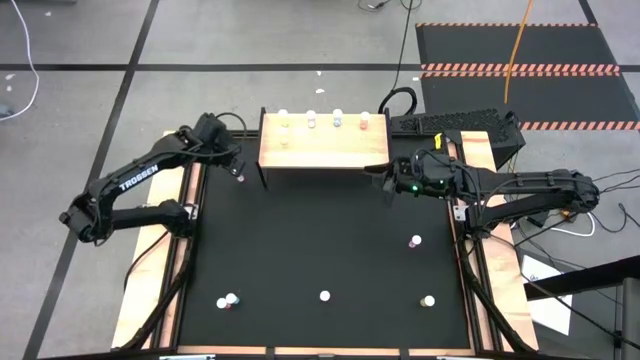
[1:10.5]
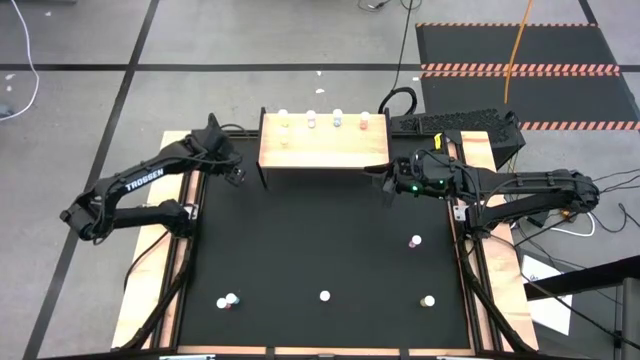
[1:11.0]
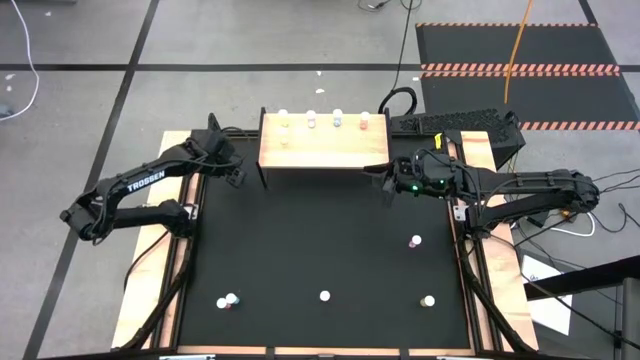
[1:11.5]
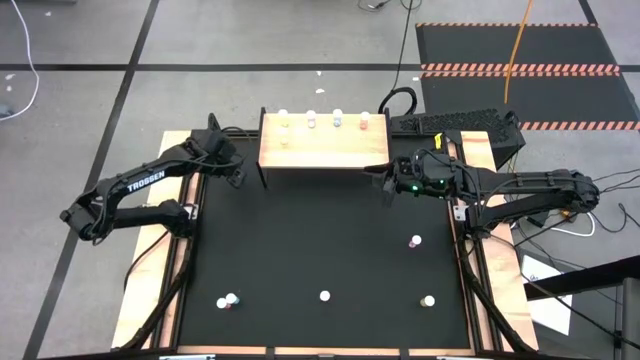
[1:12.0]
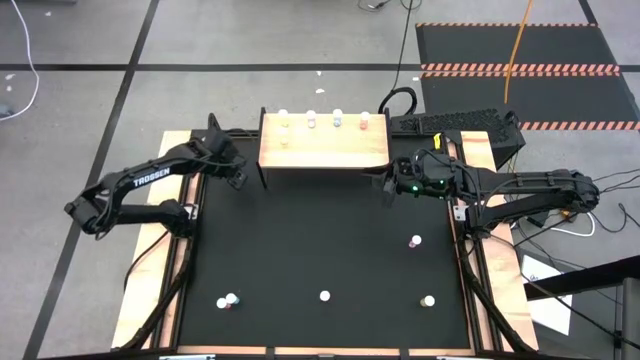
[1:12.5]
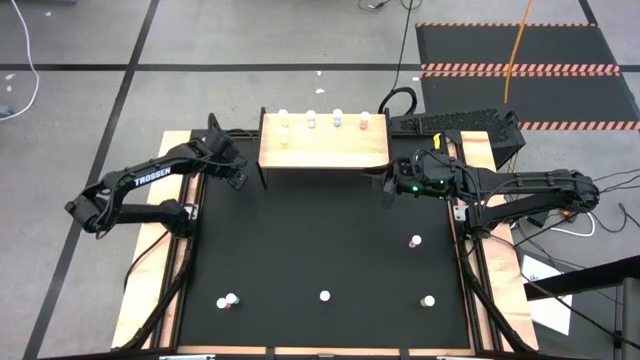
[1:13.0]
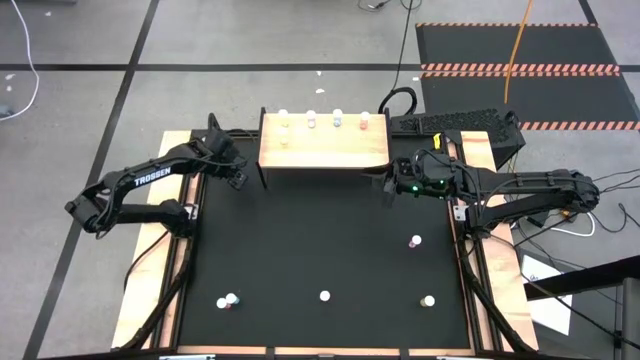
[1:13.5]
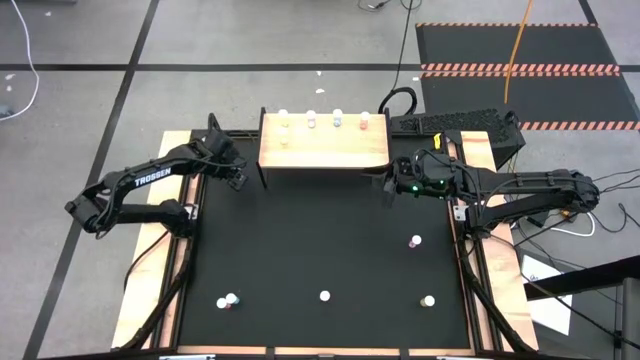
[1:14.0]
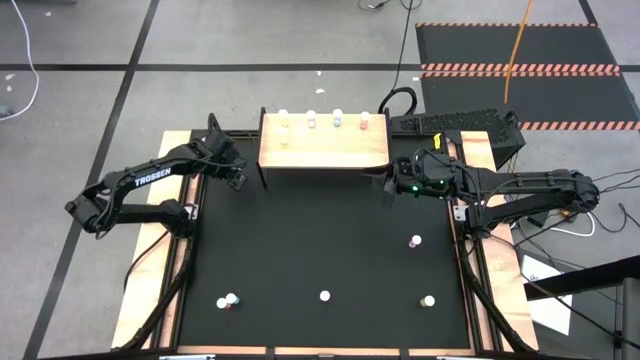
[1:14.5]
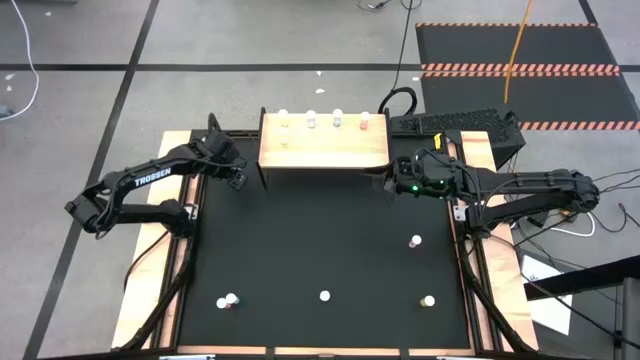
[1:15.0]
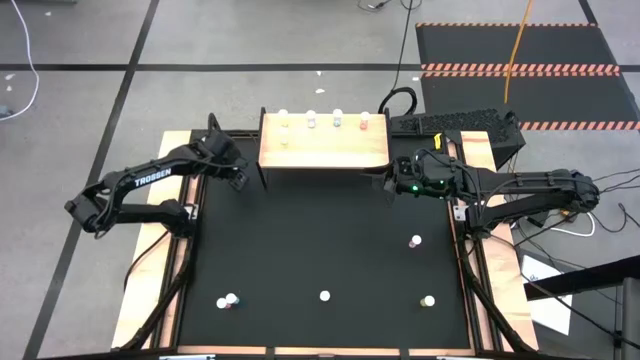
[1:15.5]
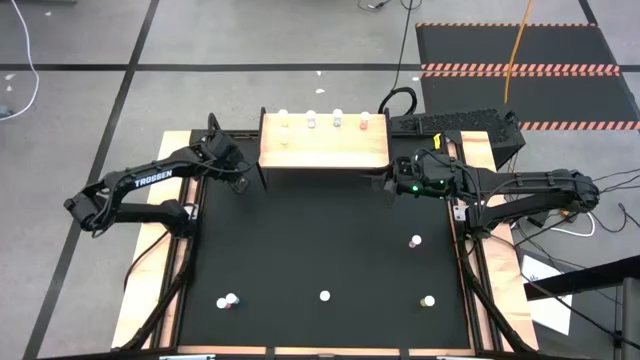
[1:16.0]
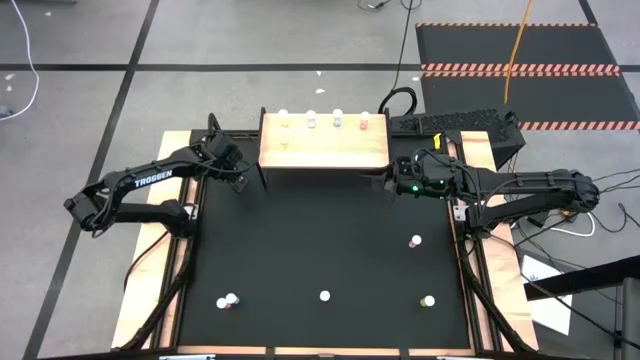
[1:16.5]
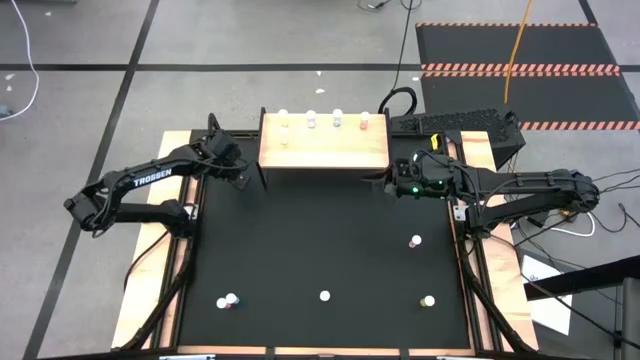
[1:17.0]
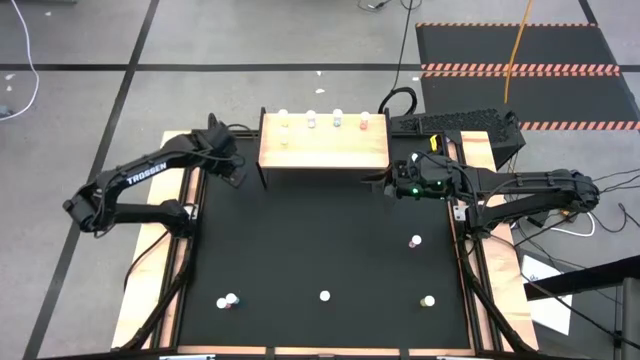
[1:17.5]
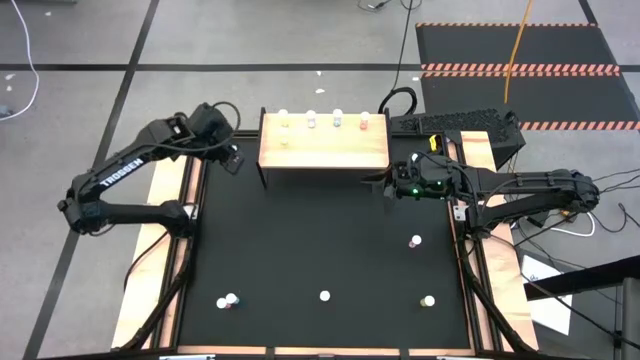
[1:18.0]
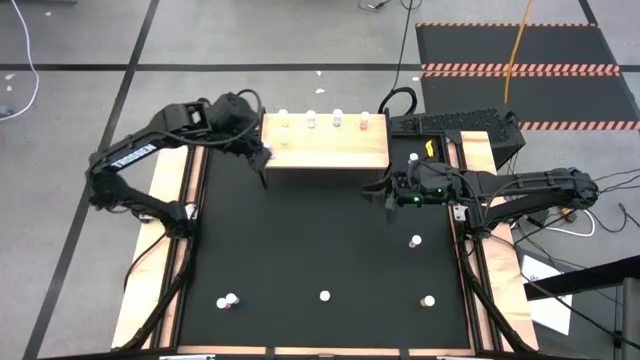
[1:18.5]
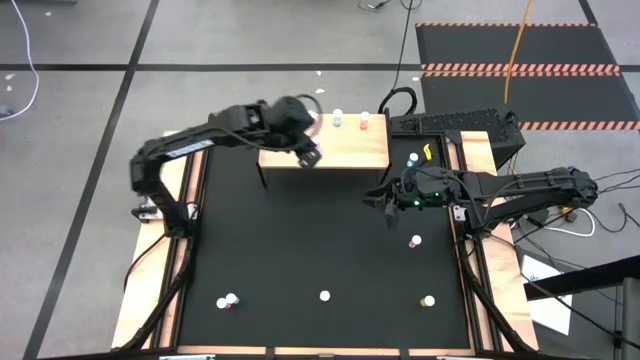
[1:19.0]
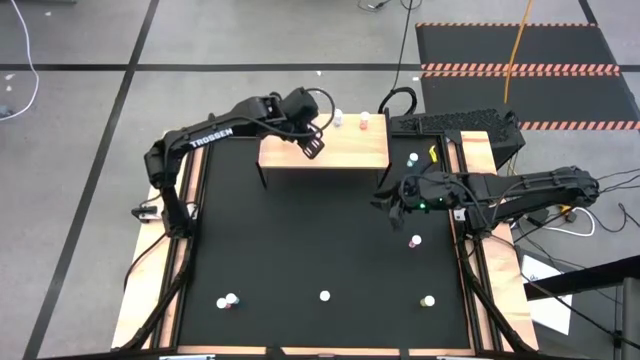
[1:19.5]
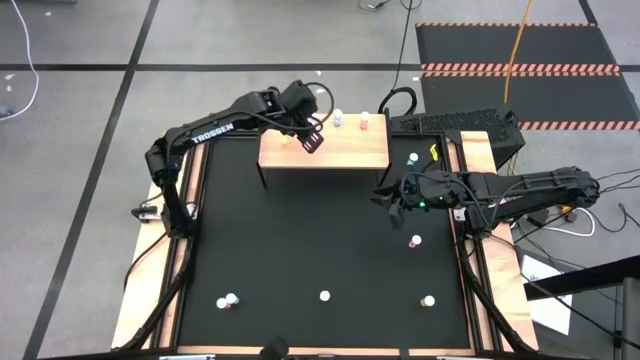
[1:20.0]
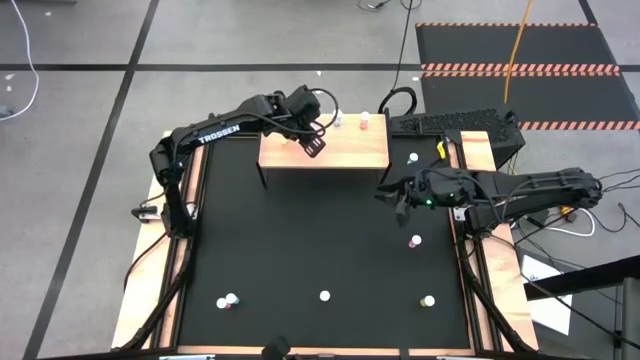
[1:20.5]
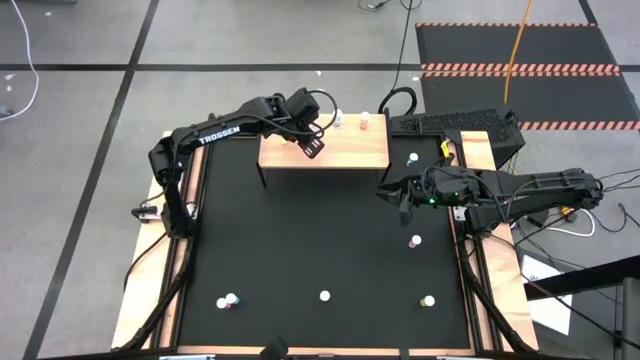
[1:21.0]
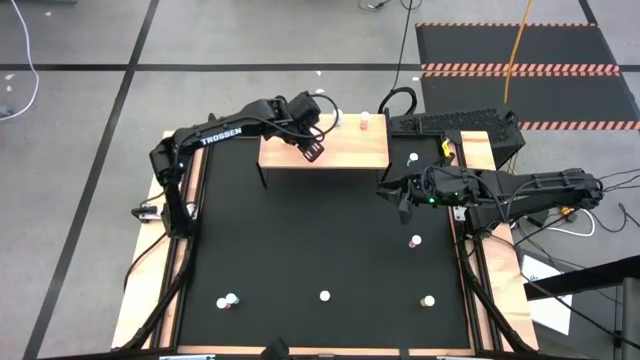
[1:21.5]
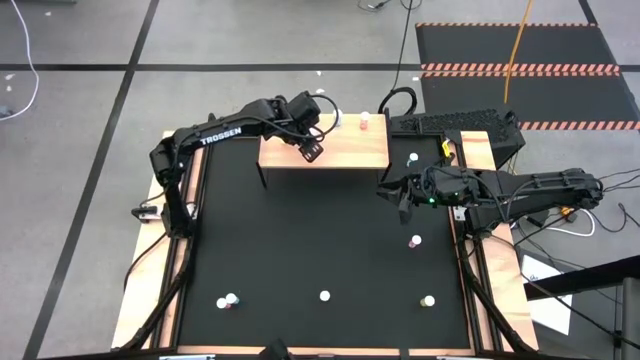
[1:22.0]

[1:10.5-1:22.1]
Task: Pick and place medicine bottles onto shelf by color
Put the top pink pill bottle on the shelf aligned with the other pink bottle

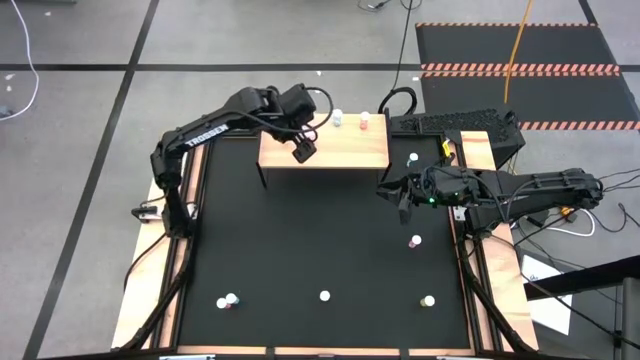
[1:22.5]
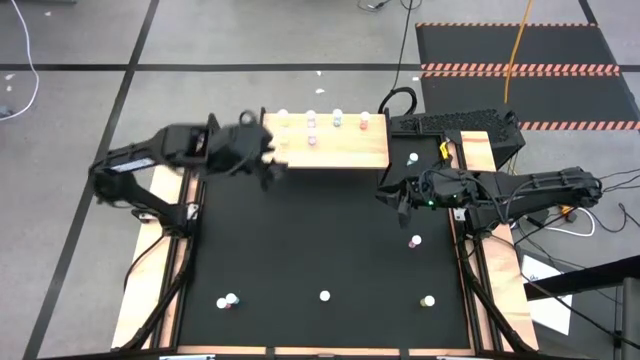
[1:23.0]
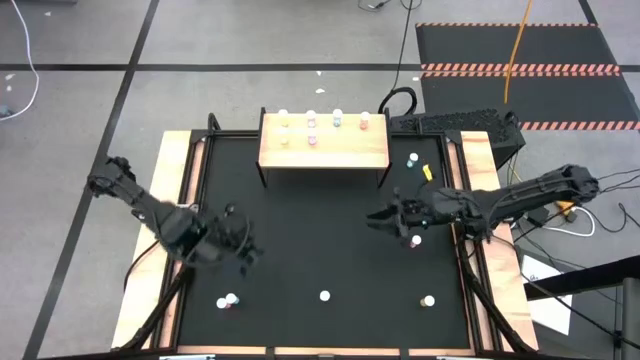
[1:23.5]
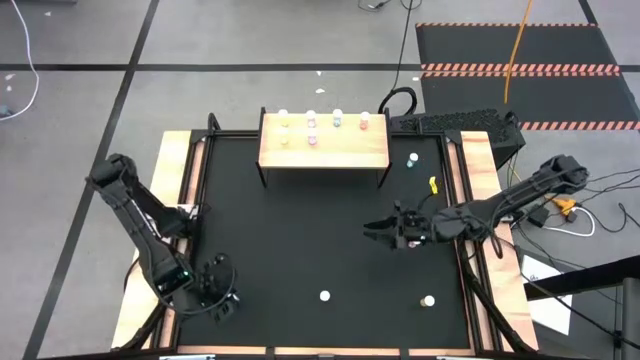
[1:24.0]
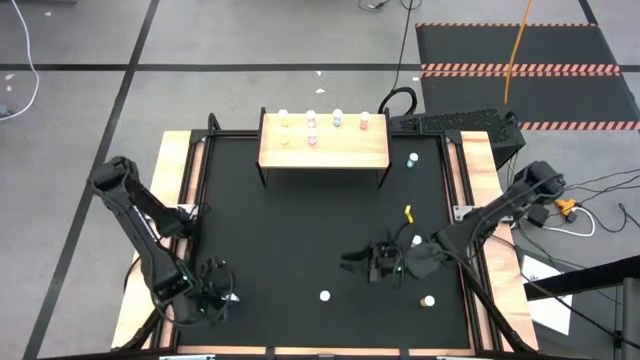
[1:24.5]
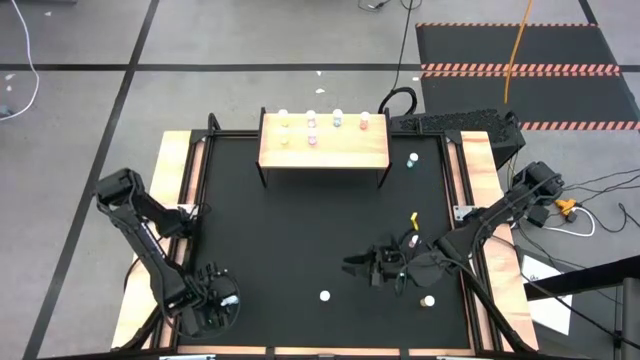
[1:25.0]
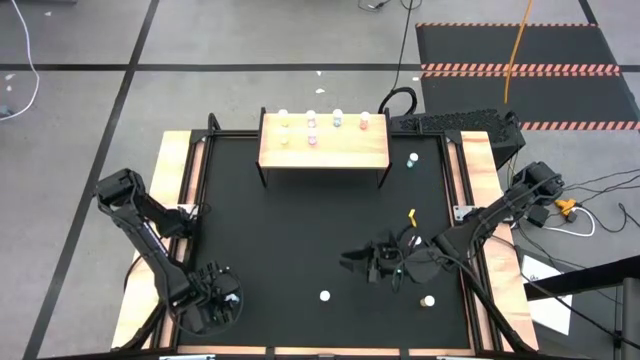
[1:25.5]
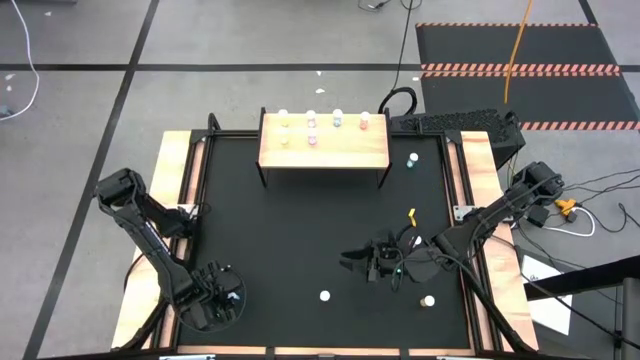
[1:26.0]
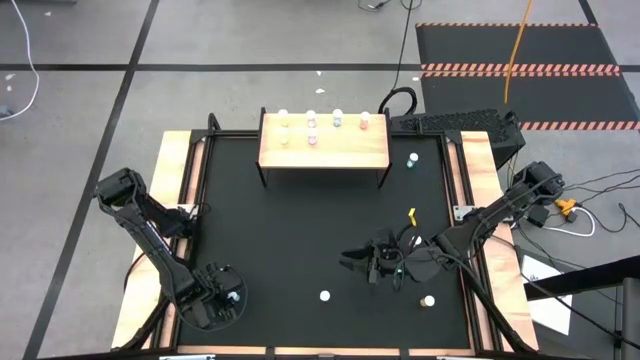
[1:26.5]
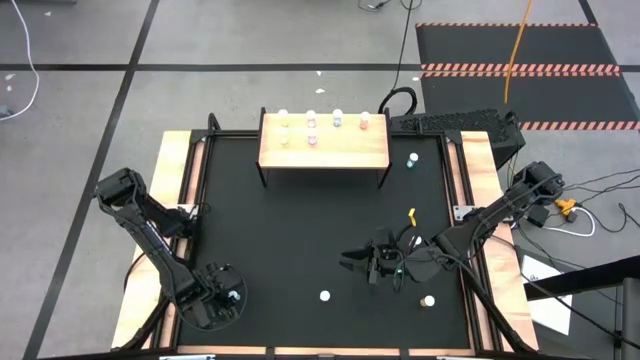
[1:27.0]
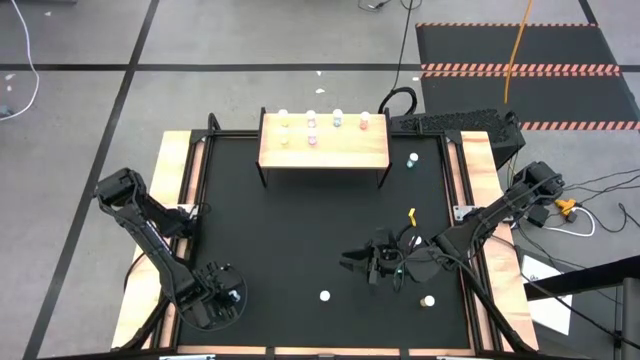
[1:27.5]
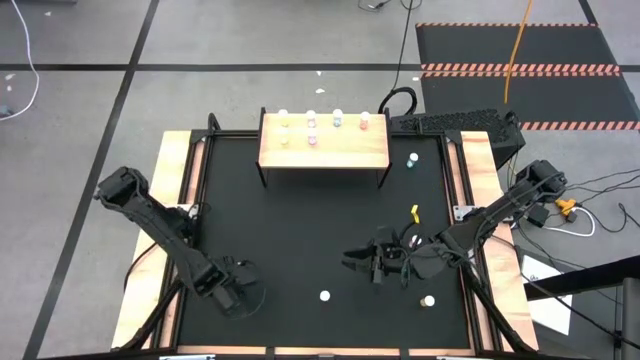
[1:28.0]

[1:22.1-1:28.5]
Put the bottom blue pill bottle on the shelf aligned with the other blue pill bottle

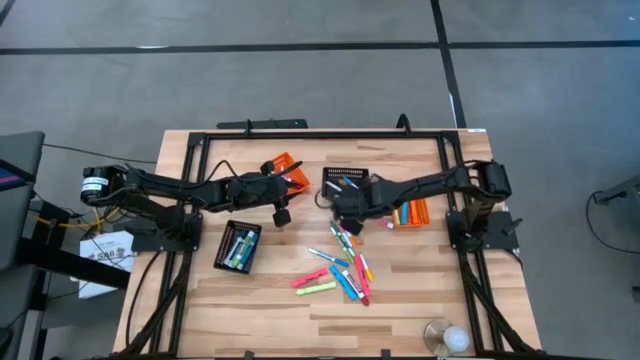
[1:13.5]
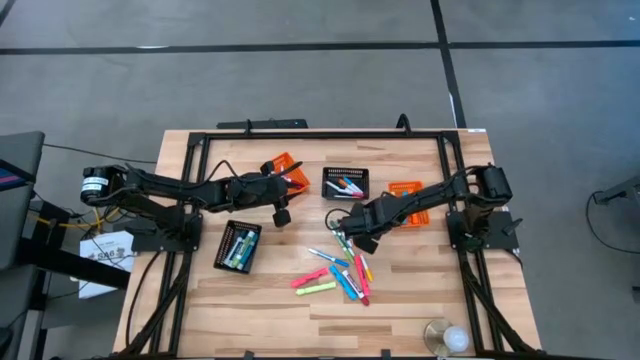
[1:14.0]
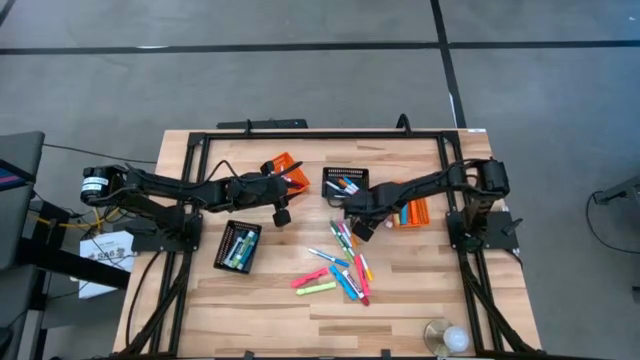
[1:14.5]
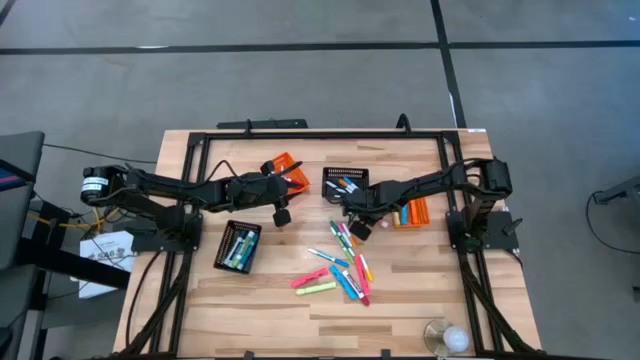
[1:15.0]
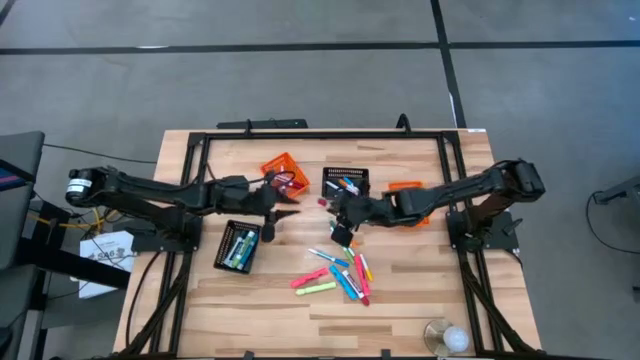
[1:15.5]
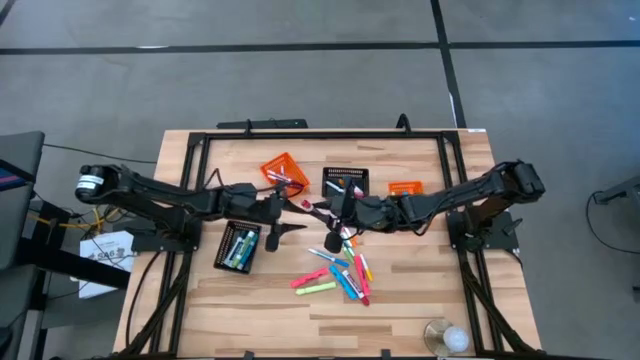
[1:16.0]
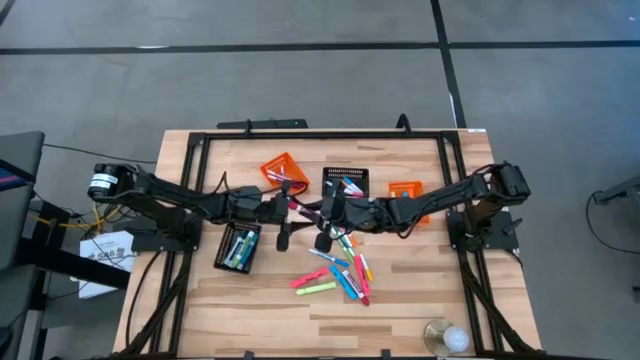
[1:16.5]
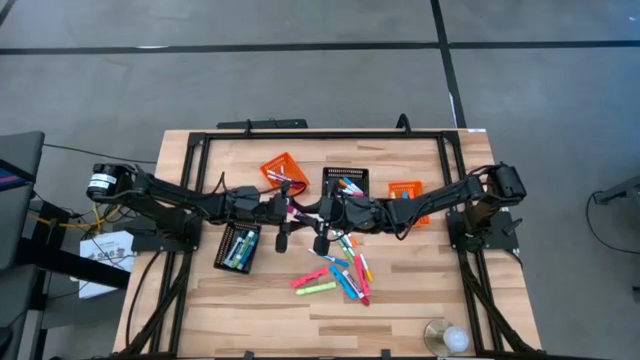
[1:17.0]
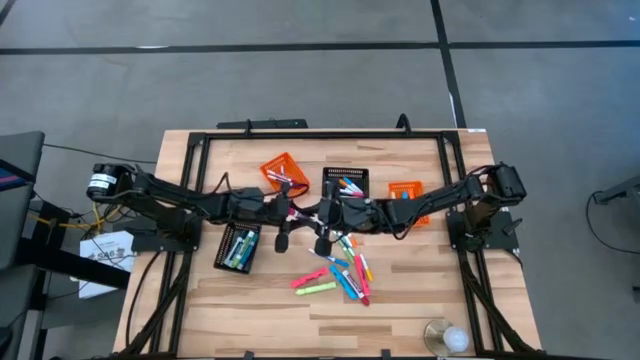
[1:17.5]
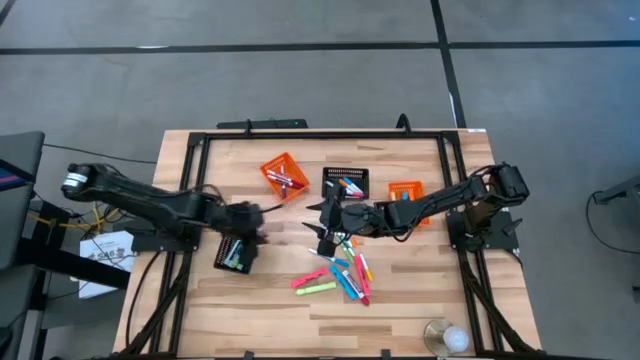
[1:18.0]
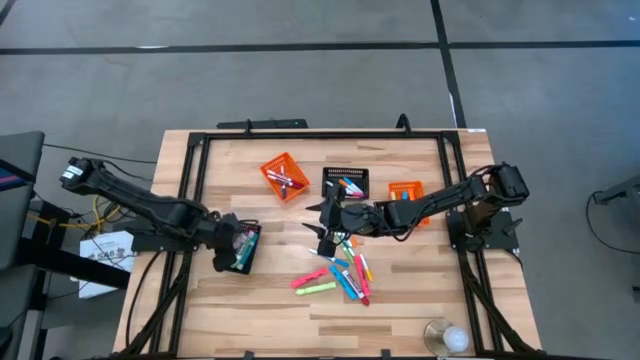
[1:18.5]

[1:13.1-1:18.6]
Task: Pick & Place Markers
Put the pink marker into the bottom black bin
